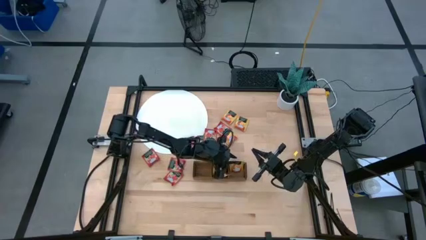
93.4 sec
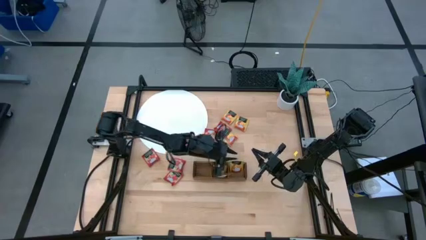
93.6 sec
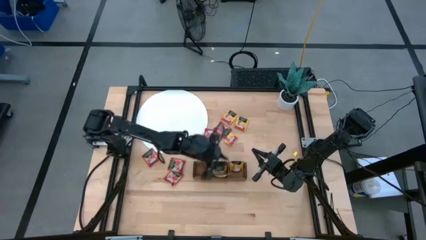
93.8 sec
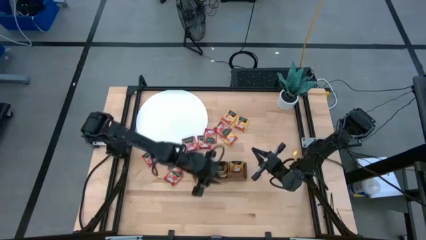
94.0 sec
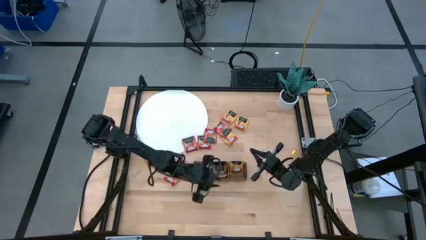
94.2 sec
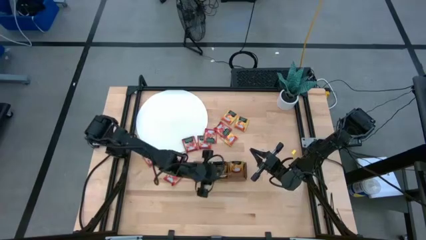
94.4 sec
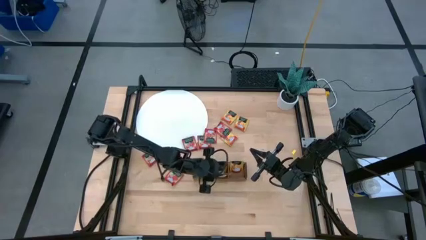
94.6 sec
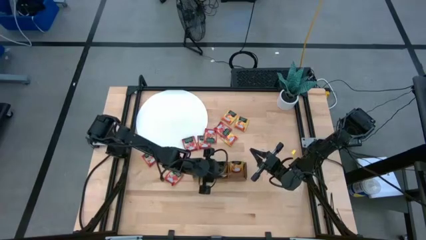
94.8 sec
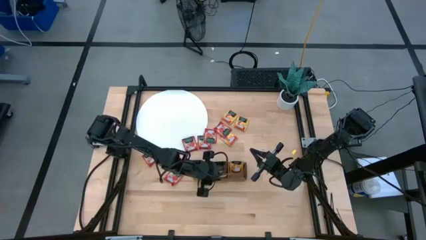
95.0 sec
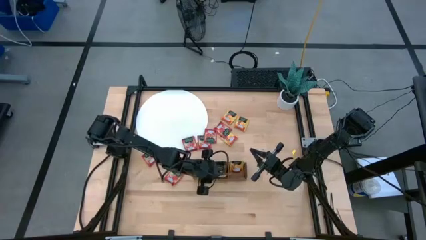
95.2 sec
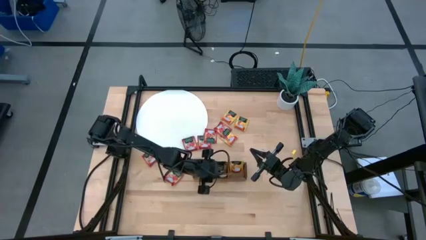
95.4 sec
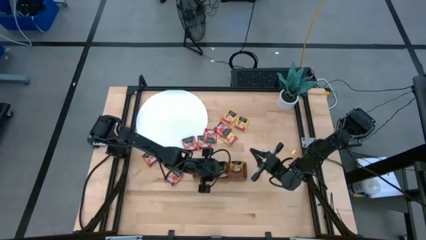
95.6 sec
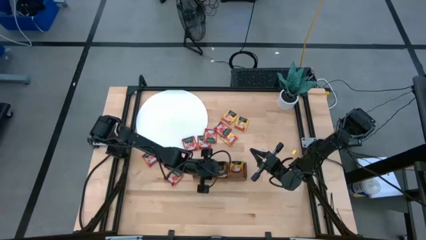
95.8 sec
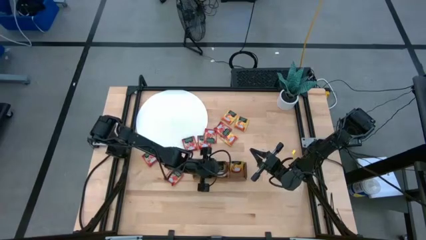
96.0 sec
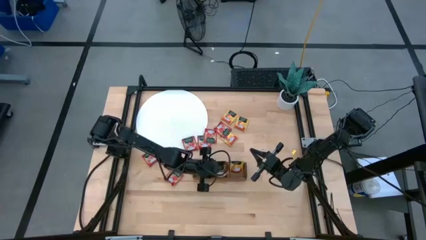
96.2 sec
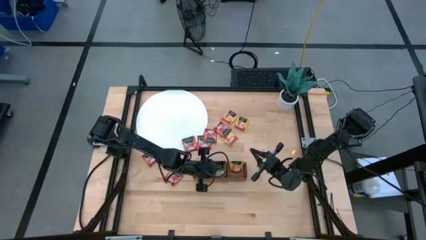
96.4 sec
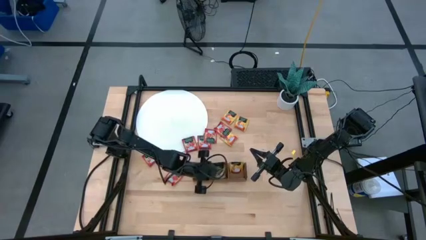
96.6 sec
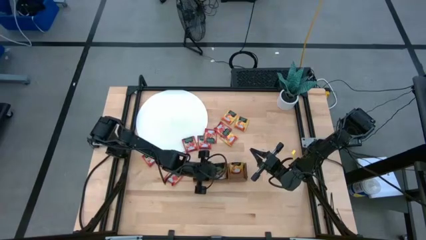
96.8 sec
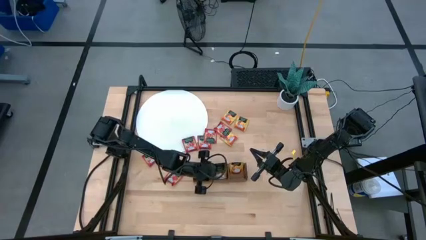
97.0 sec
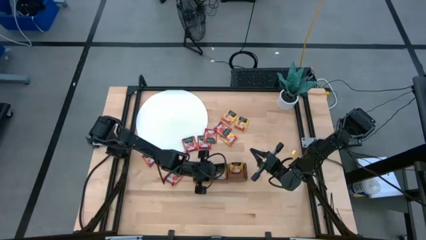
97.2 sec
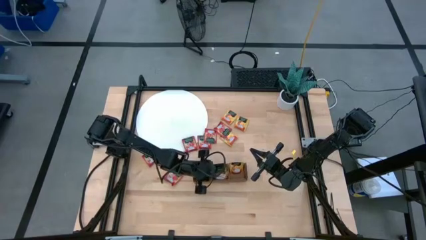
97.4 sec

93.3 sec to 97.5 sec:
Task: Pick & Place Tea
Adjust the brown tea bag on the middle section of the wooden organizer

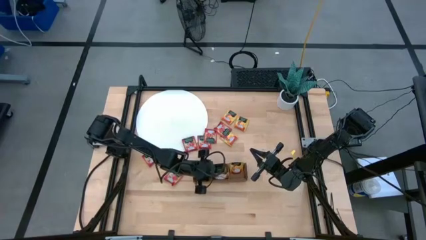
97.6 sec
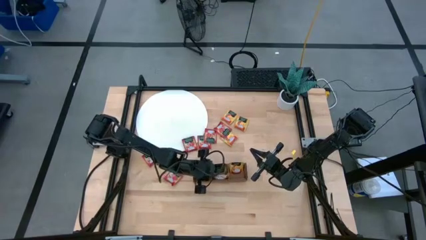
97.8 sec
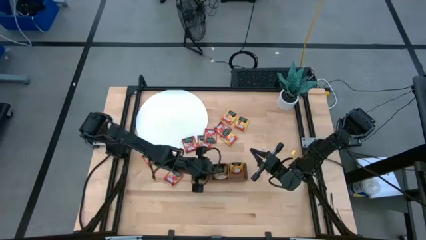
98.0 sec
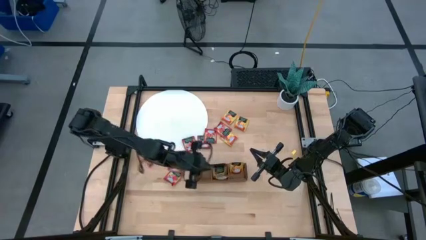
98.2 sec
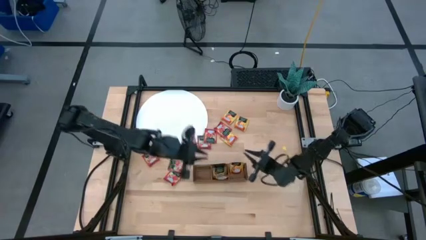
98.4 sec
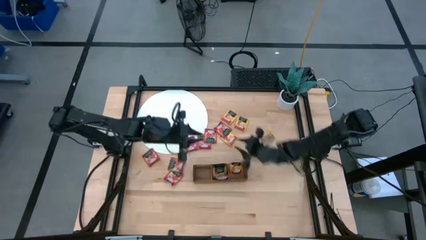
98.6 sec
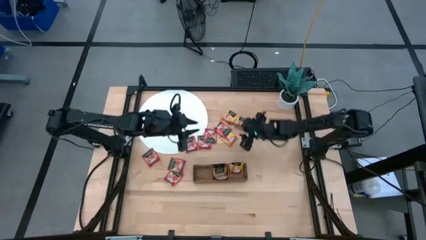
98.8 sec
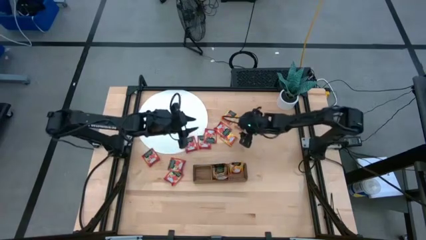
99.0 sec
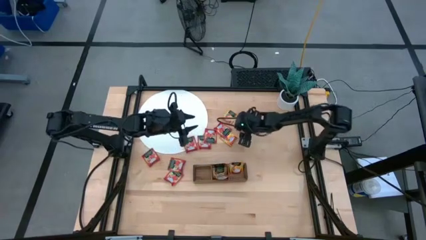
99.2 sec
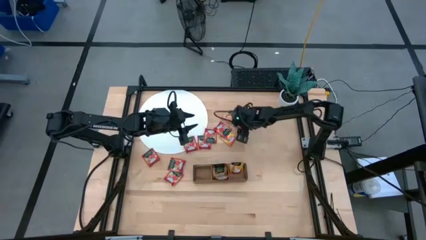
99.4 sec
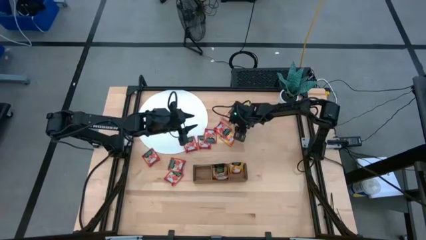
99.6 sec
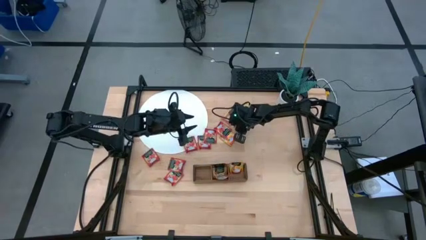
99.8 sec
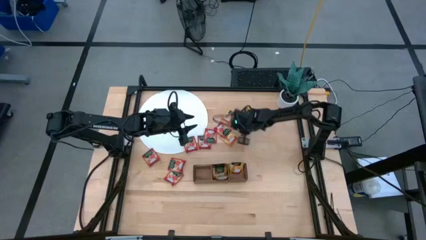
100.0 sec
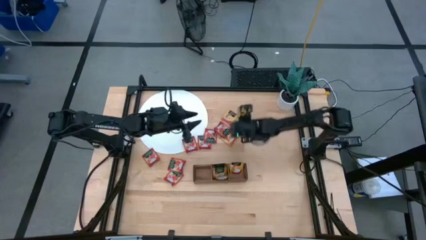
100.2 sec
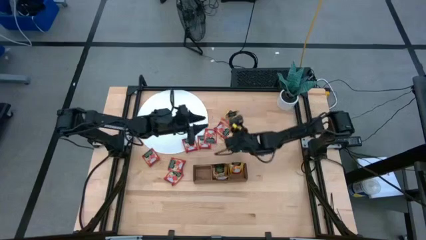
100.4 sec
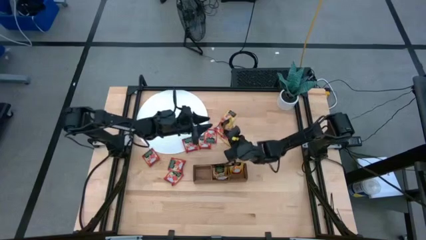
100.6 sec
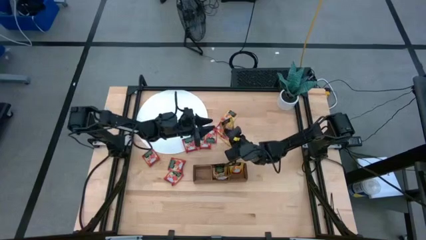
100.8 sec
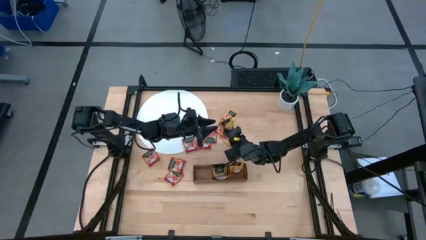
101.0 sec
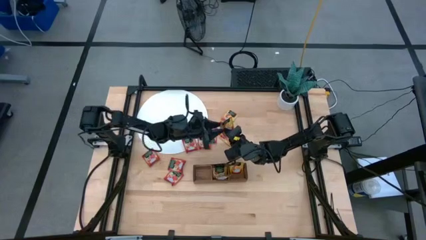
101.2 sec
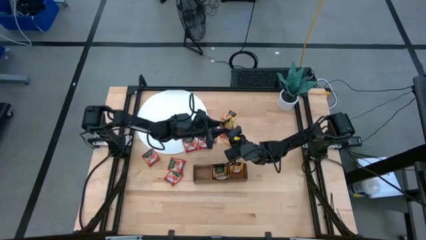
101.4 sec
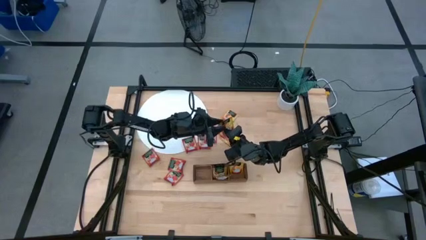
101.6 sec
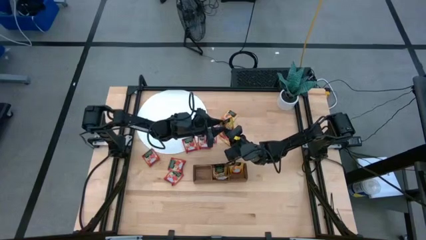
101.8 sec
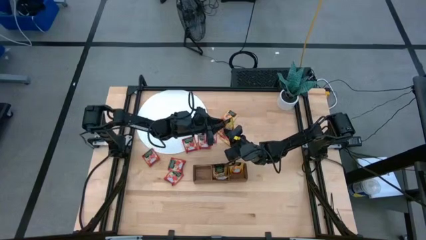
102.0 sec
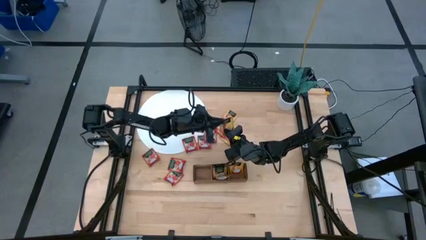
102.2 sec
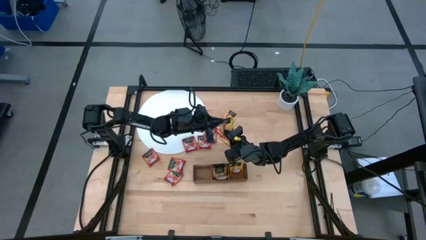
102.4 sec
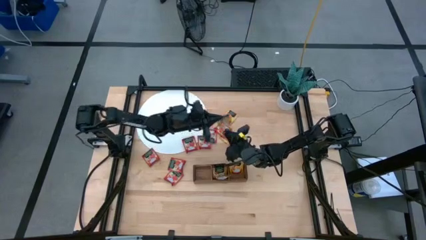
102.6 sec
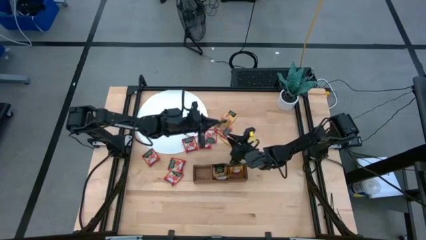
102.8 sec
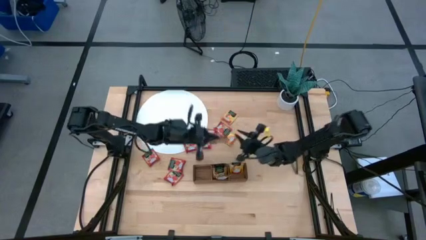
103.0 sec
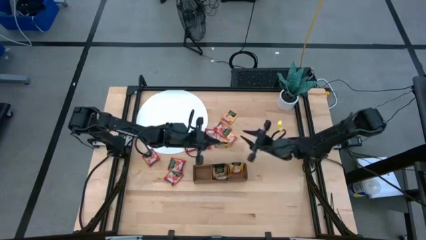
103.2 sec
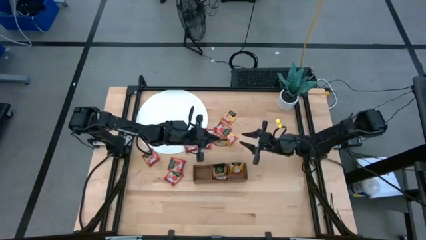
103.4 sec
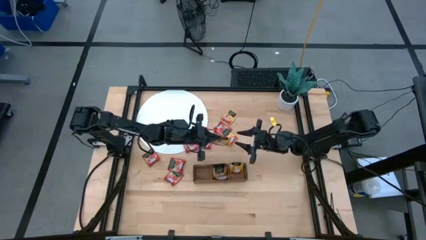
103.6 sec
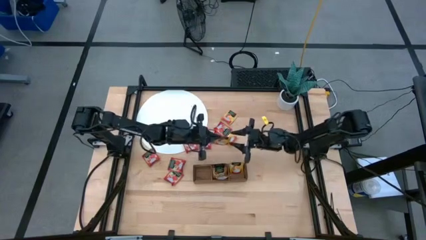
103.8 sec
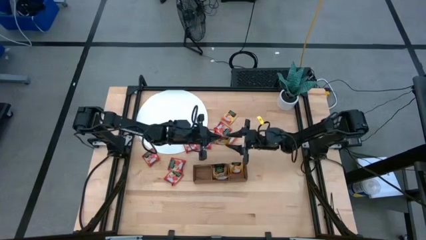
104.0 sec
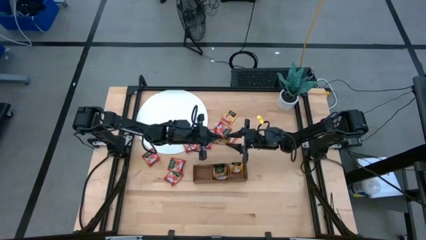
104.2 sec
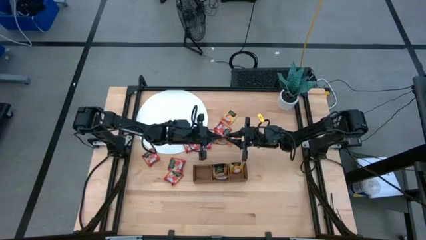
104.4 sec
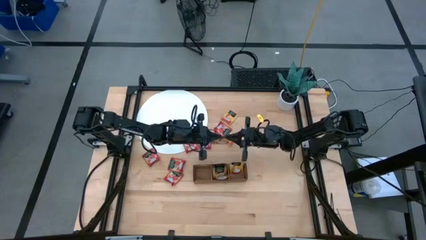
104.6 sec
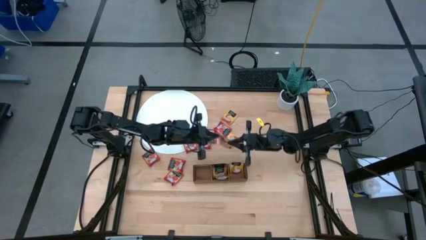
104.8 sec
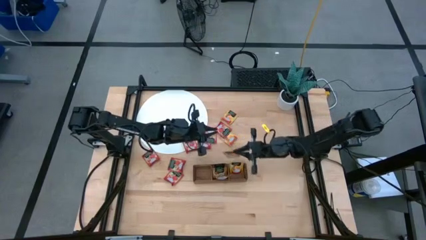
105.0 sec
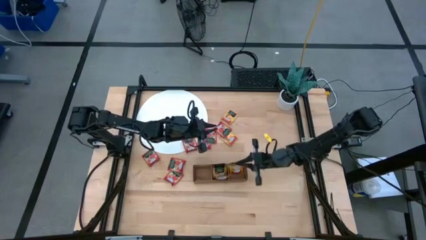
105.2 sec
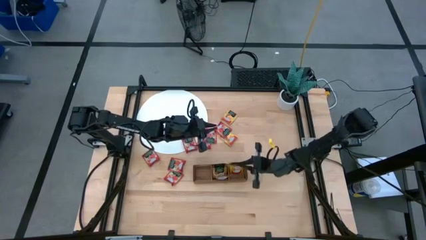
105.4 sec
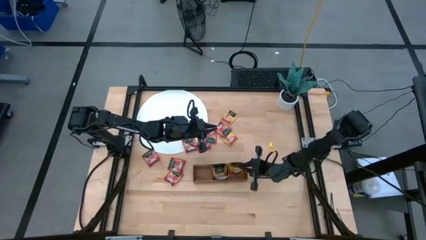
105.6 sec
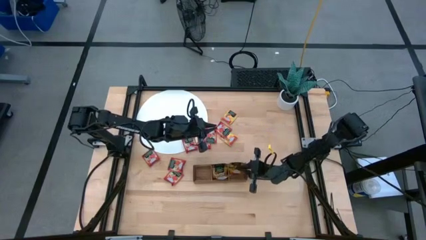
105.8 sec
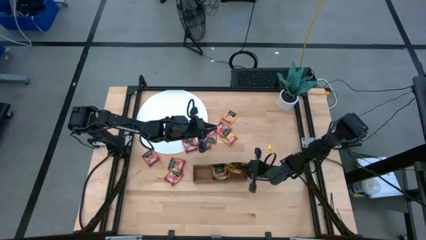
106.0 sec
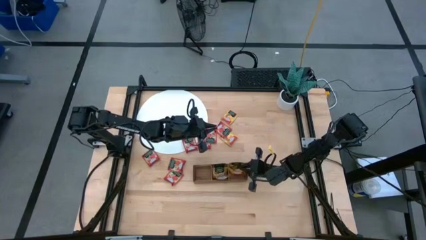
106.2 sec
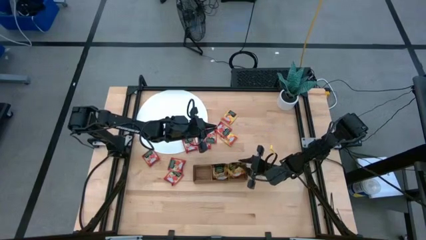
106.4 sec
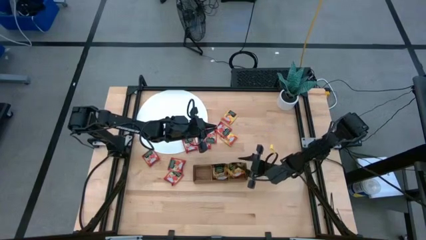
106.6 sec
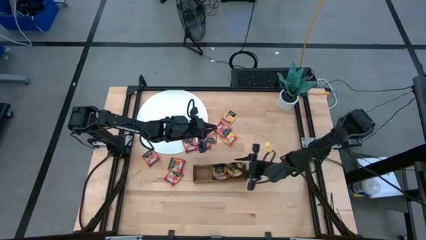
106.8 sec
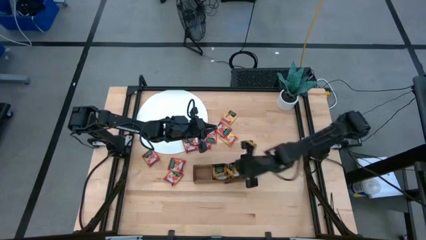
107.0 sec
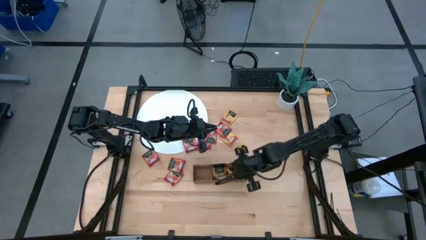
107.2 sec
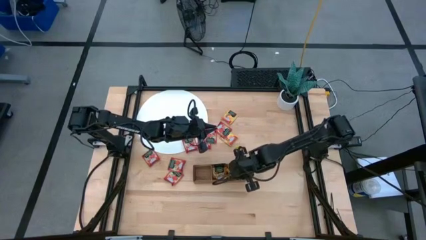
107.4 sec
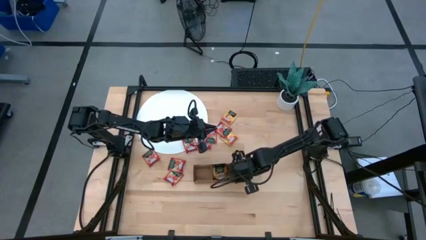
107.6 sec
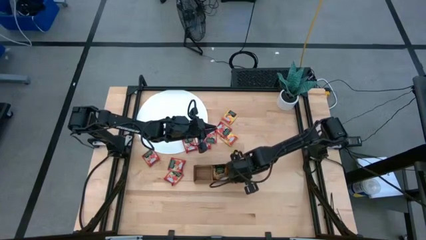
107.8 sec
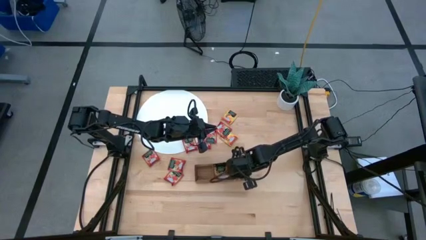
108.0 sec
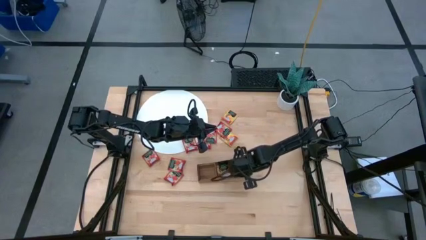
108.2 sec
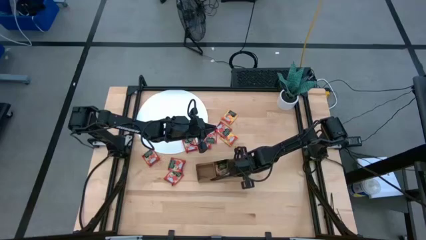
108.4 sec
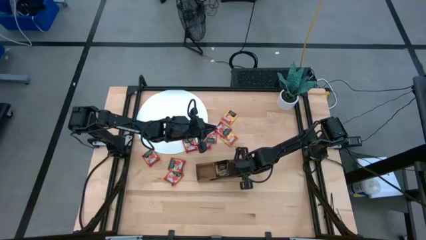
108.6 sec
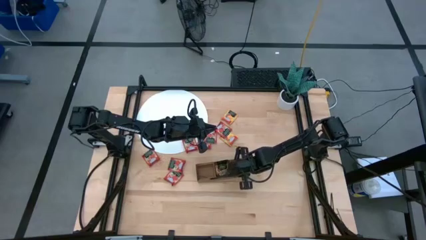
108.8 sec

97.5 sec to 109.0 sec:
Put the top right yellow tea bag into the right section of the wooden organizer

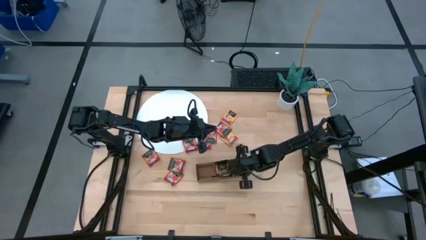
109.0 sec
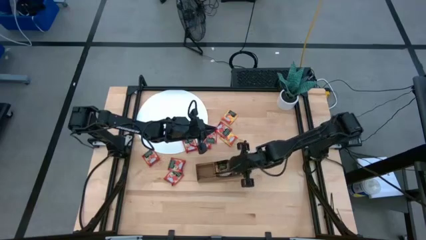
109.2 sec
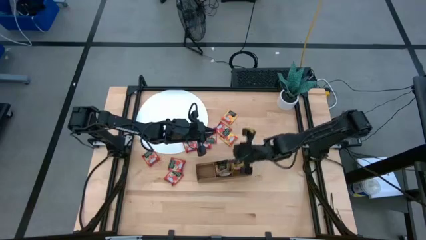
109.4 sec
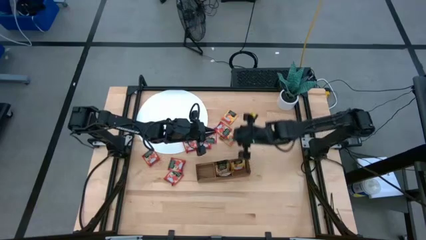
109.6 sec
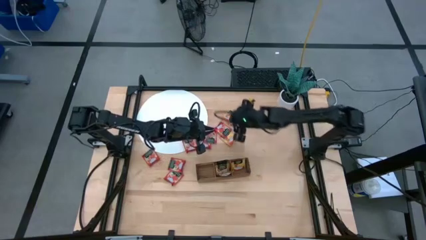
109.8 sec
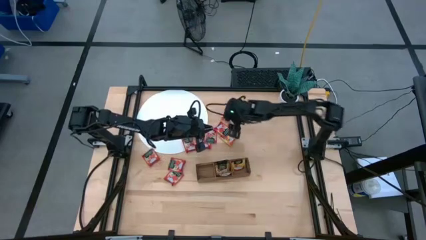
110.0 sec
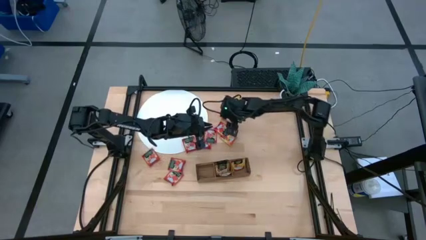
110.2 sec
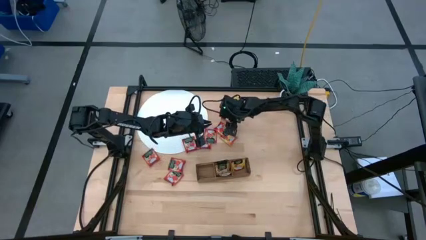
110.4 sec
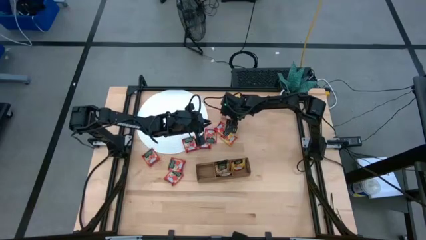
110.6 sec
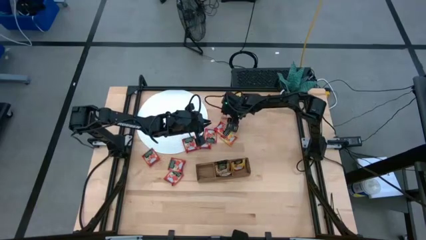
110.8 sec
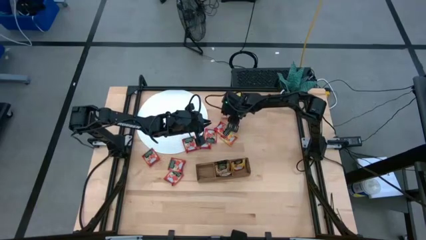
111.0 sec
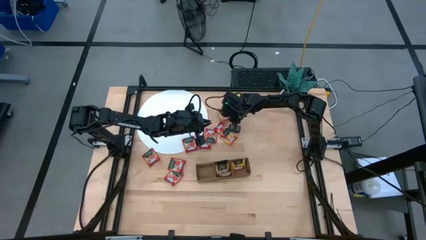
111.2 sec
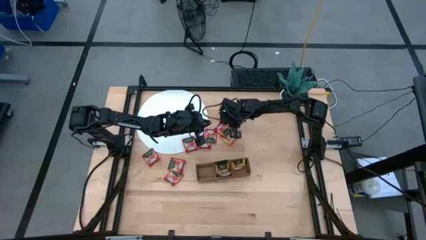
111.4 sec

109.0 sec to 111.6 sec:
Put the top yellow tea bag into the right section of the wooden organizer
